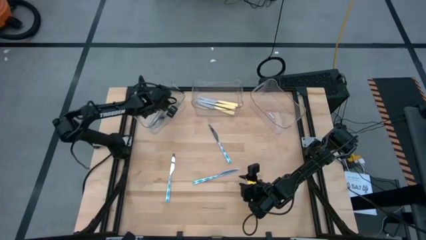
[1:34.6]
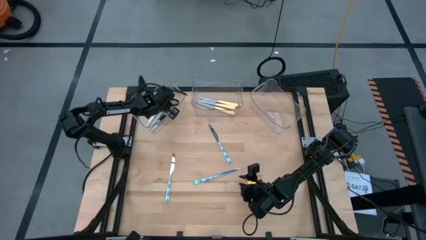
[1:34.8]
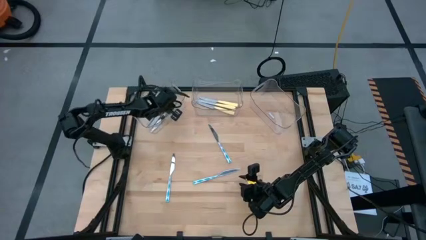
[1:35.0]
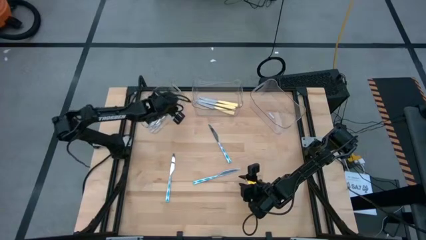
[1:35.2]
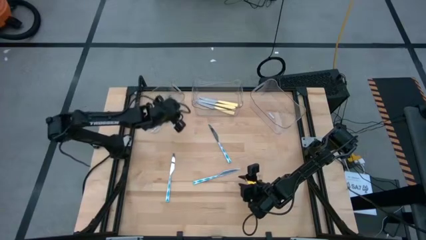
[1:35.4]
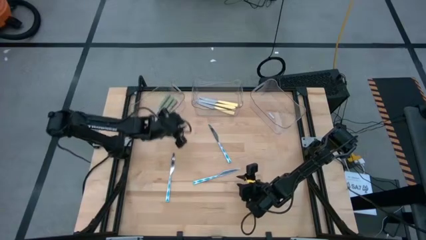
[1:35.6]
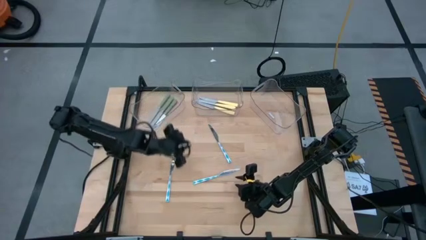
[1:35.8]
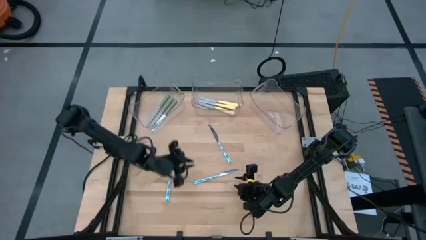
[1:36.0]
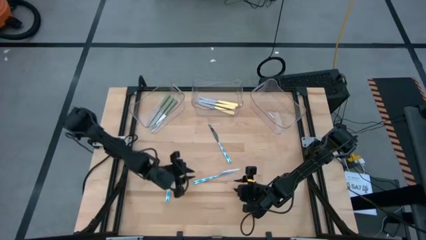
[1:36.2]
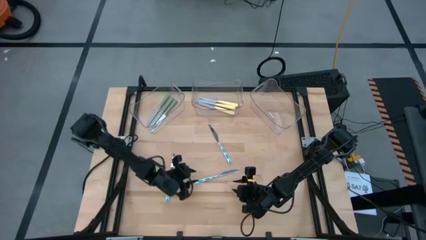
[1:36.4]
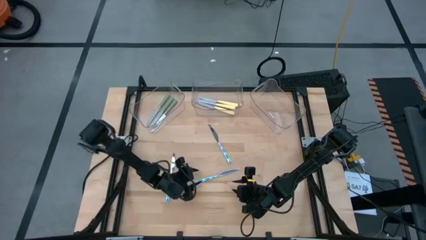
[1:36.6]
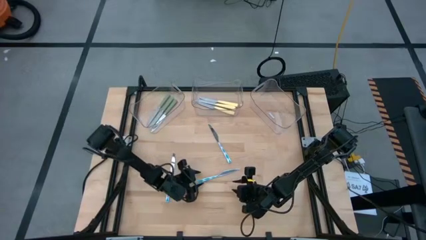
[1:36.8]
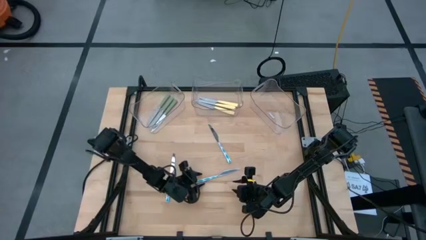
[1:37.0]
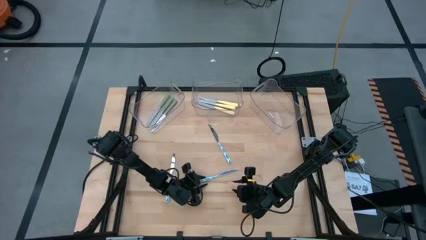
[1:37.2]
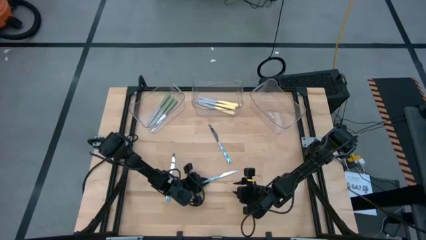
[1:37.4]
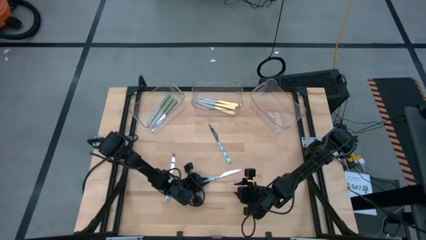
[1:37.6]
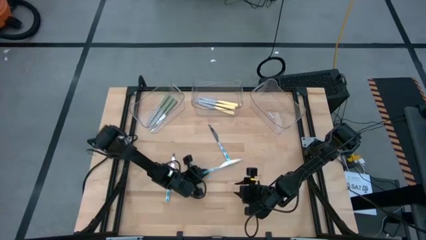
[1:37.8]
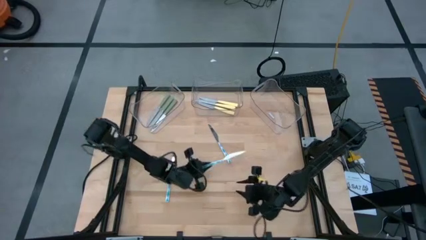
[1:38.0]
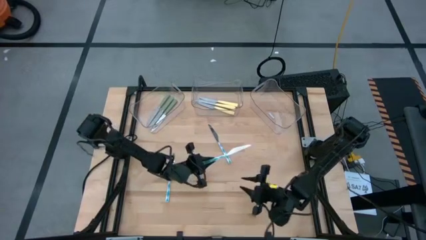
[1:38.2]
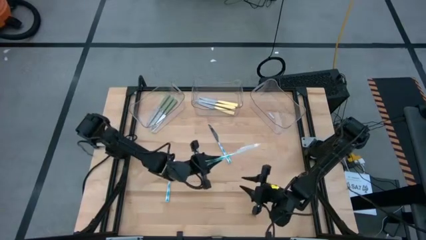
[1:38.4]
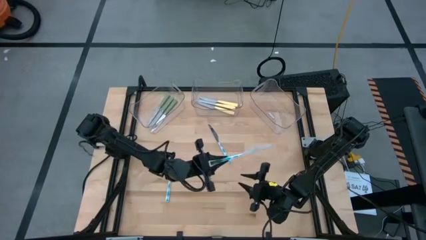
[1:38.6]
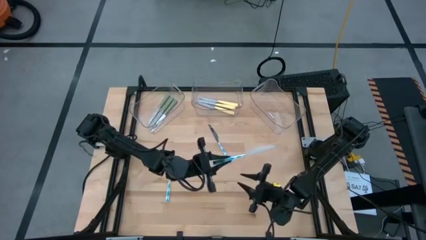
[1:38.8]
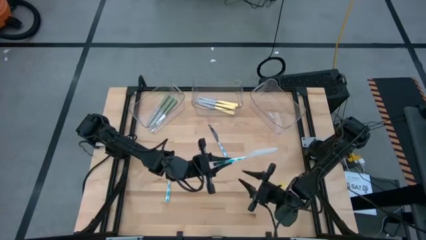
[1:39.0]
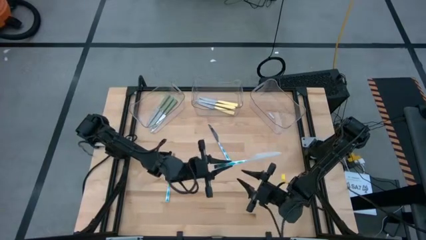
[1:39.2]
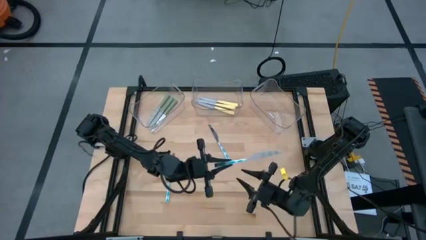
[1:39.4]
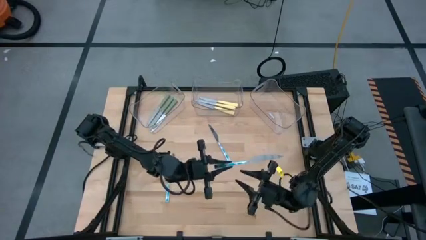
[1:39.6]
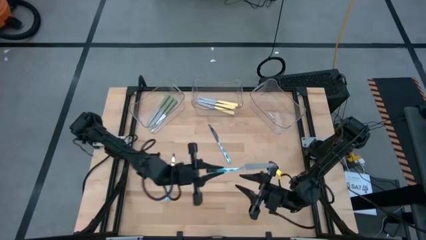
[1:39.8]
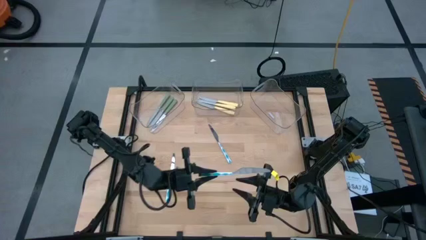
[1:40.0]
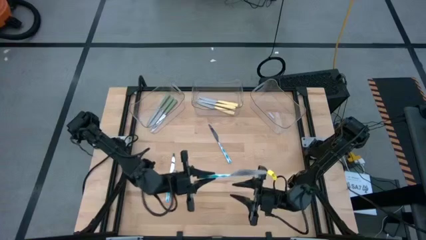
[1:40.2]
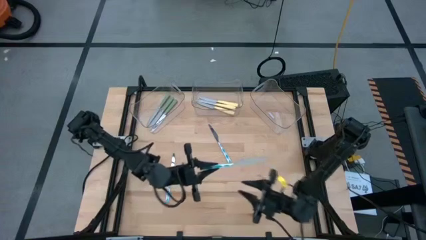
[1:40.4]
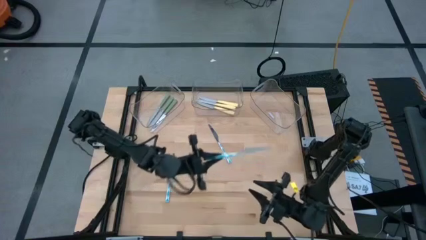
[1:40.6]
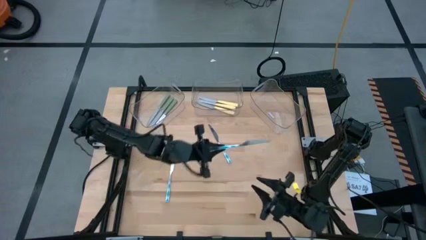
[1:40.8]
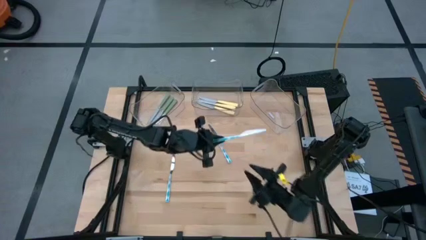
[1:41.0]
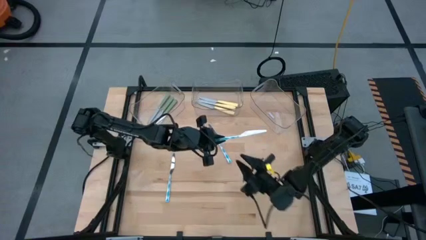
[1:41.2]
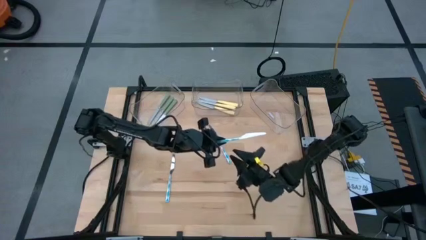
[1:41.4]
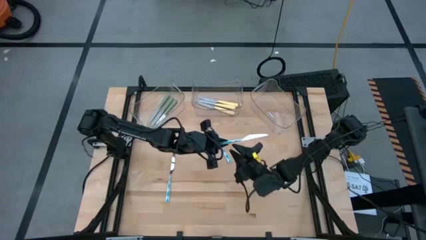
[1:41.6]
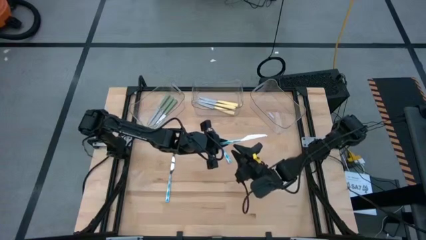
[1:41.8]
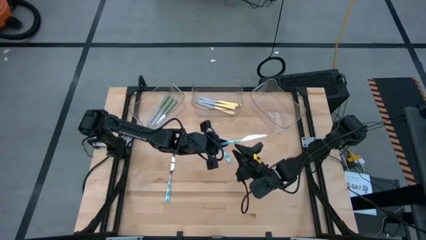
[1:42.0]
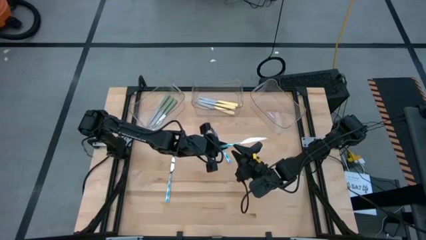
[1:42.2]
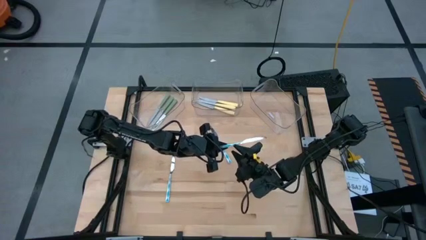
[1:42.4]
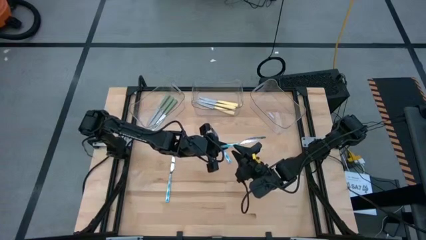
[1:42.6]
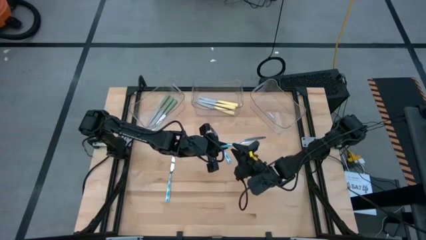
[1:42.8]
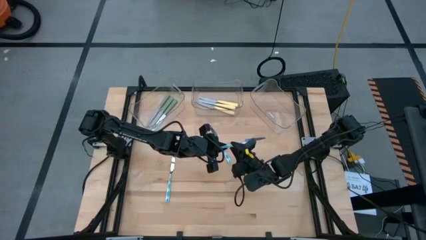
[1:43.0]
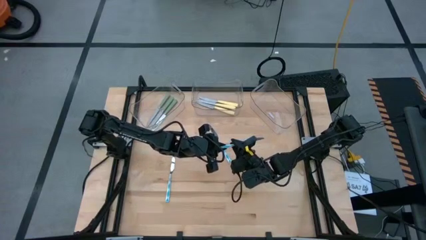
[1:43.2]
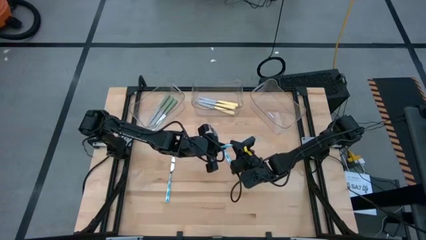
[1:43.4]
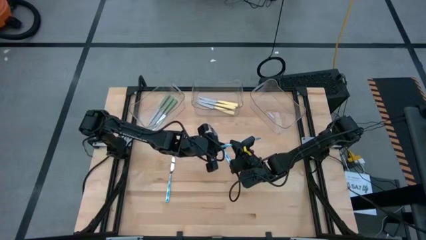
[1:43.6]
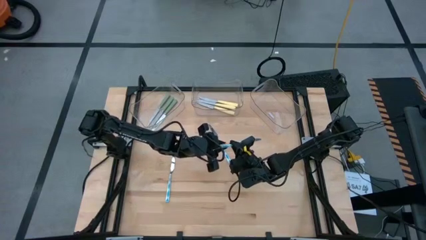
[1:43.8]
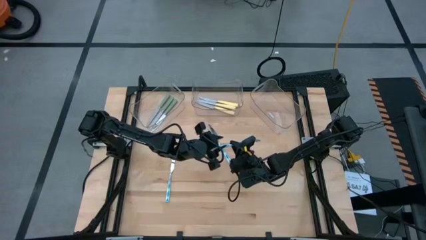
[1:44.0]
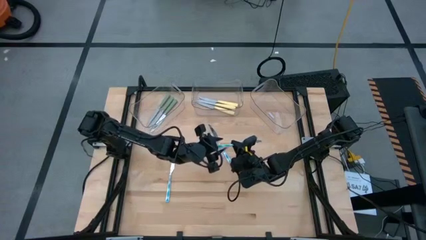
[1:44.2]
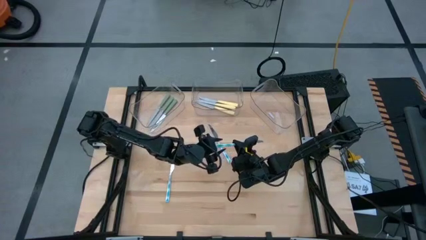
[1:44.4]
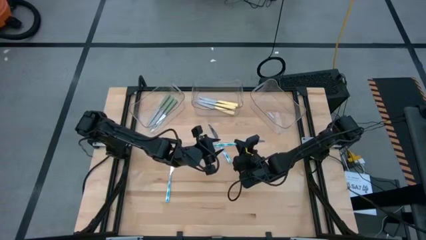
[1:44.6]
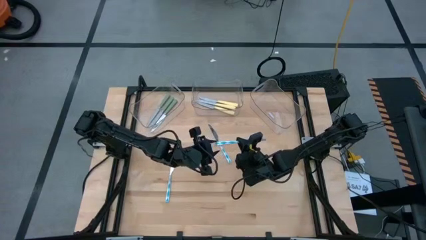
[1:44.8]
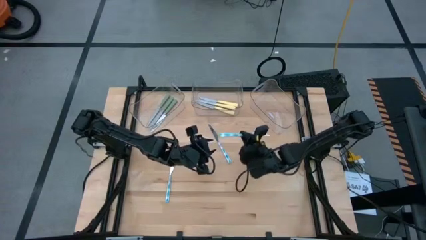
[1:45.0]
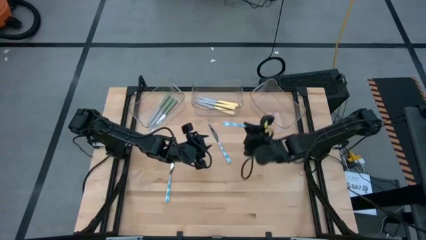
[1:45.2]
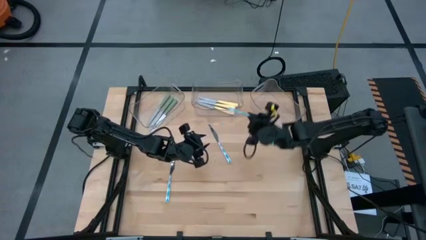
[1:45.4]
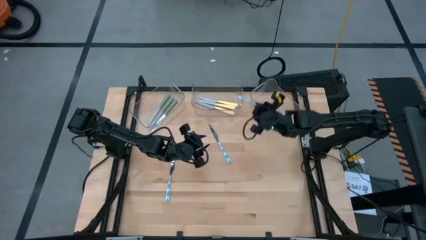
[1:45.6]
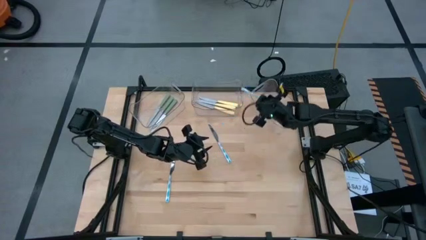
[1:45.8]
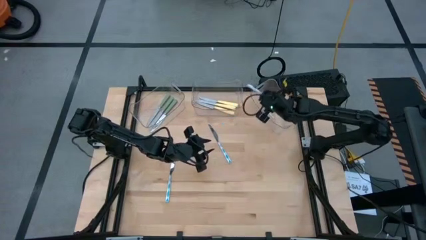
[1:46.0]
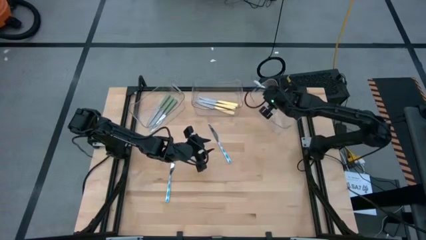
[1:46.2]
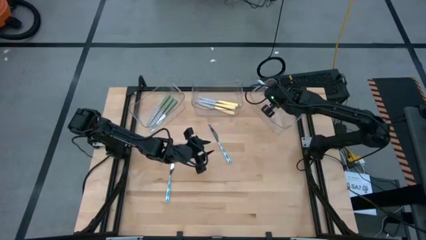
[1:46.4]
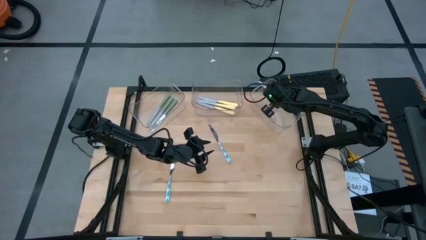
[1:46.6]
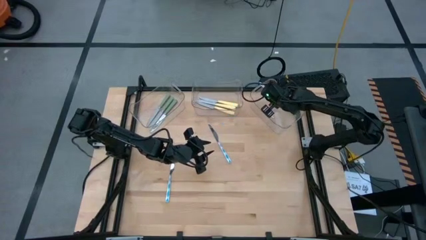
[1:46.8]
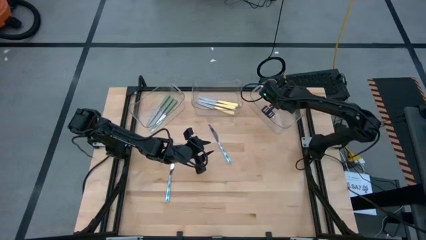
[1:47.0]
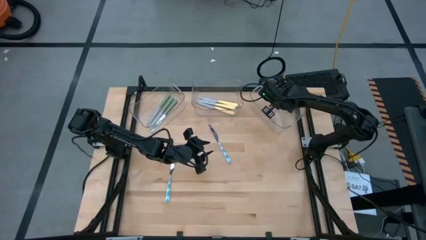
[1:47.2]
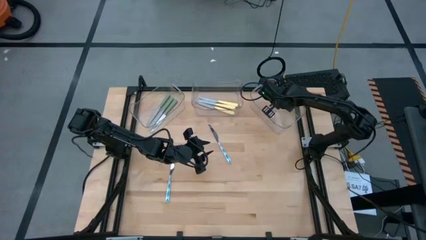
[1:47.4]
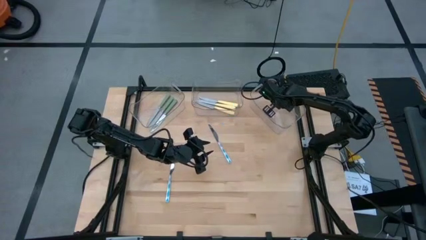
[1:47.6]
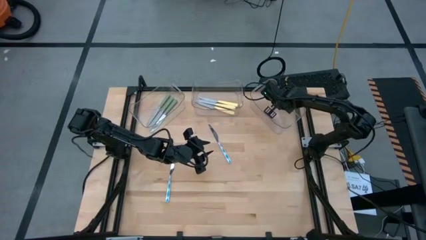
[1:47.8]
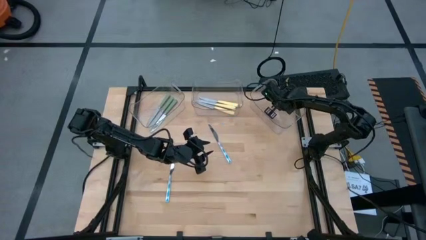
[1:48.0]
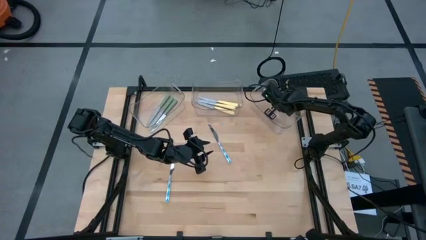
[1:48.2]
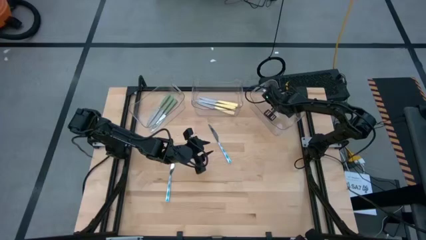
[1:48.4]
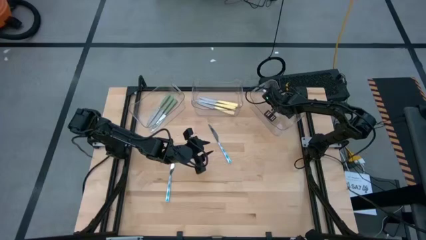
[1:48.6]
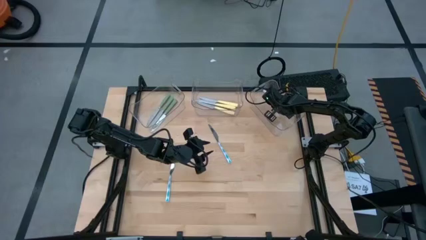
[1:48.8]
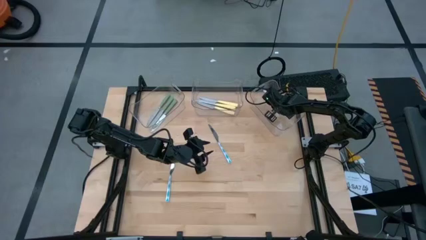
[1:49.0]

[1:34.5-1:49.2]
Task: Sort silverware by color (type)
Put the bottom right blue table knife into the right transparent bin
